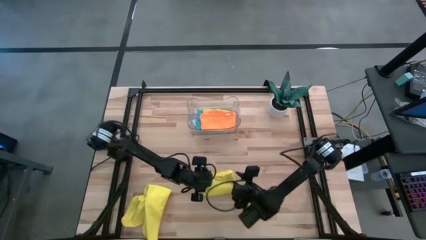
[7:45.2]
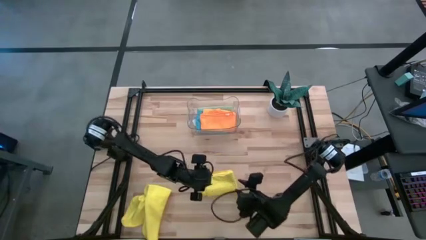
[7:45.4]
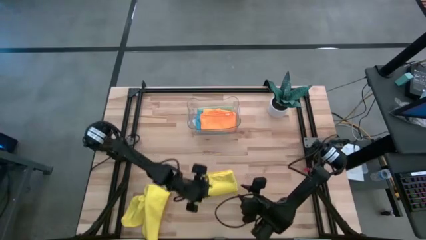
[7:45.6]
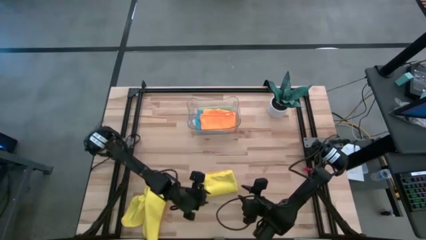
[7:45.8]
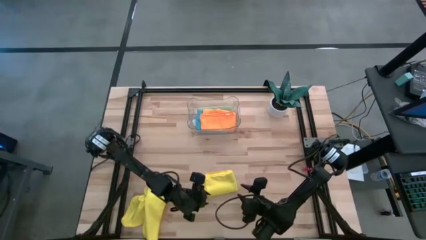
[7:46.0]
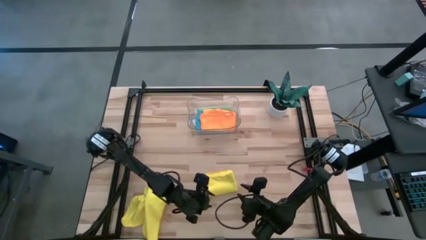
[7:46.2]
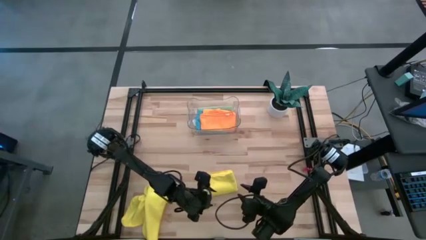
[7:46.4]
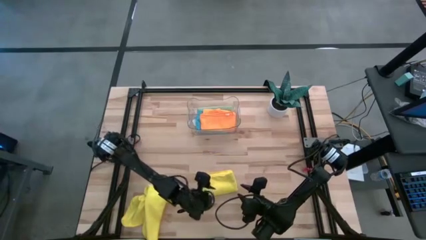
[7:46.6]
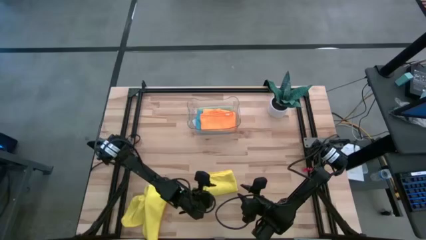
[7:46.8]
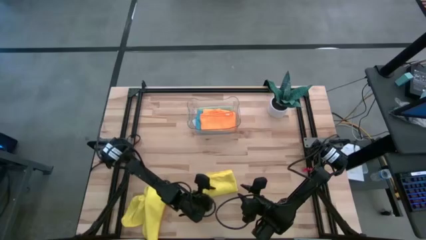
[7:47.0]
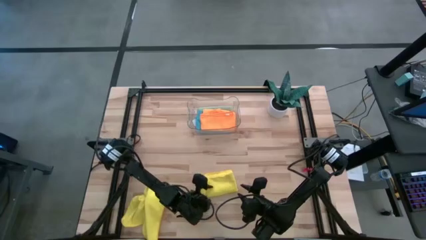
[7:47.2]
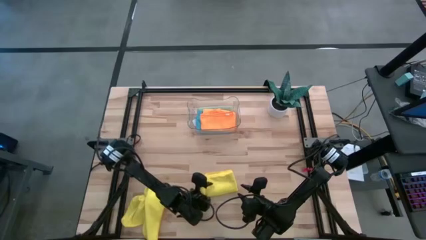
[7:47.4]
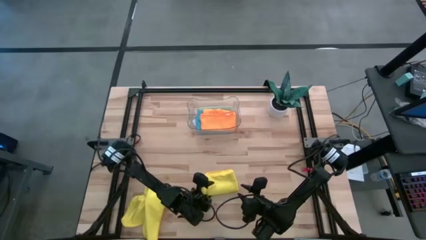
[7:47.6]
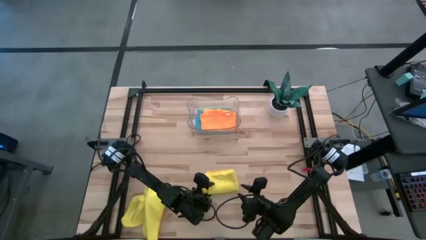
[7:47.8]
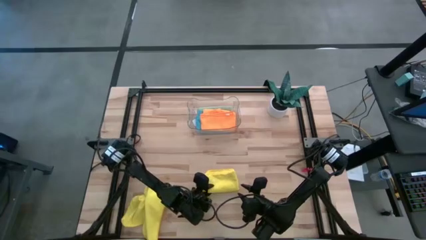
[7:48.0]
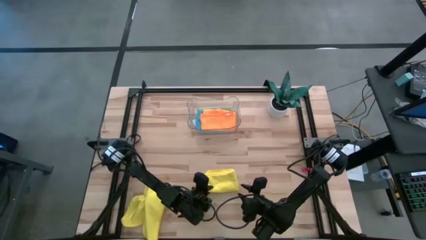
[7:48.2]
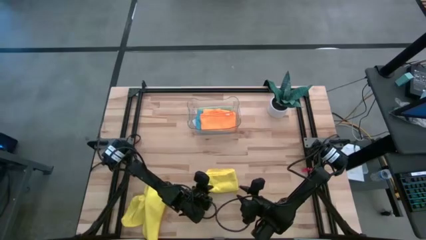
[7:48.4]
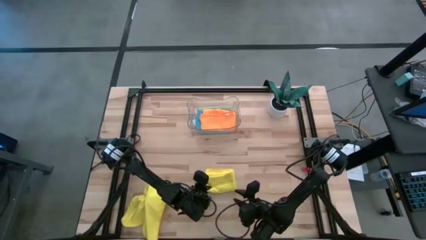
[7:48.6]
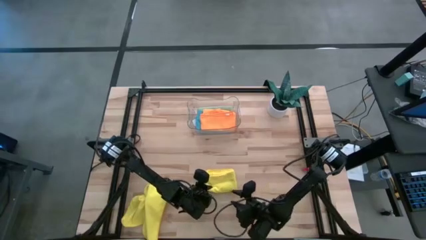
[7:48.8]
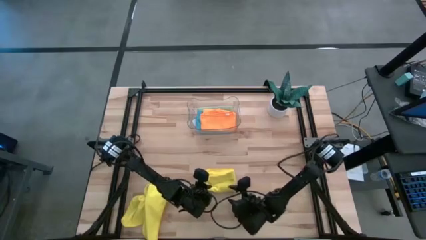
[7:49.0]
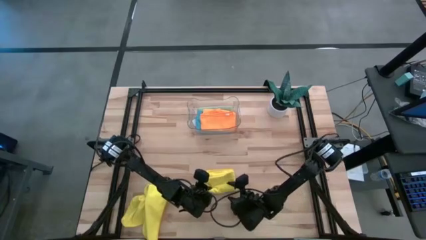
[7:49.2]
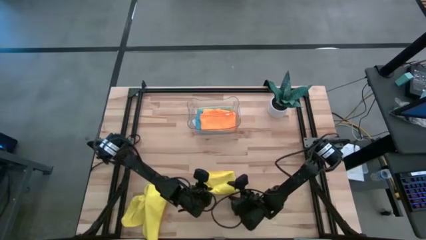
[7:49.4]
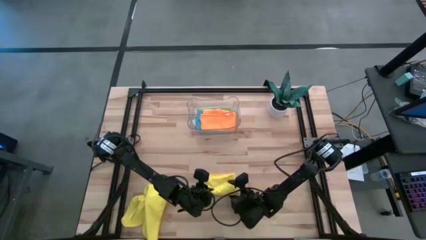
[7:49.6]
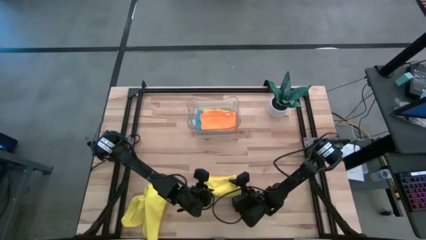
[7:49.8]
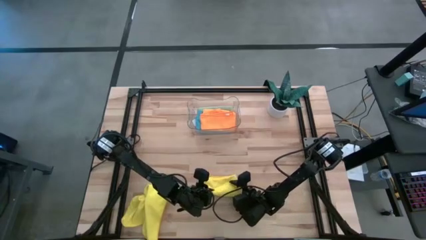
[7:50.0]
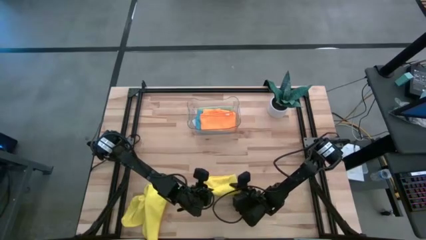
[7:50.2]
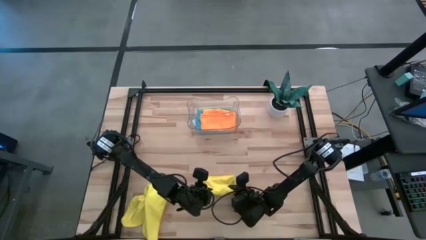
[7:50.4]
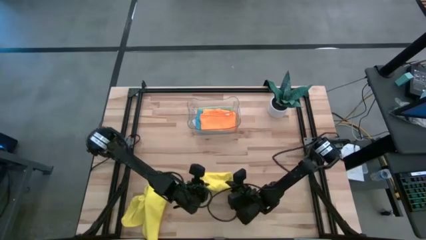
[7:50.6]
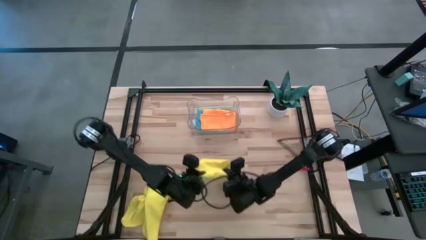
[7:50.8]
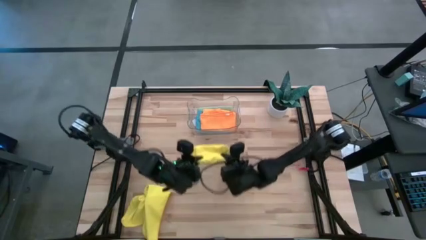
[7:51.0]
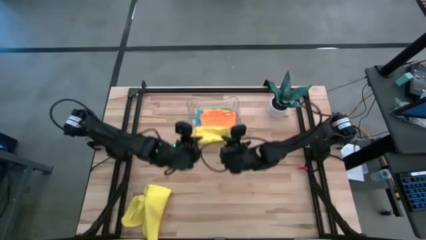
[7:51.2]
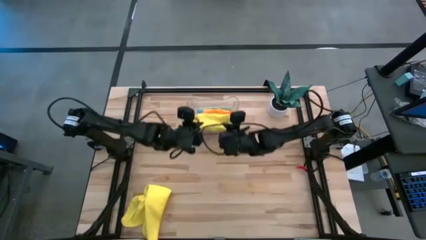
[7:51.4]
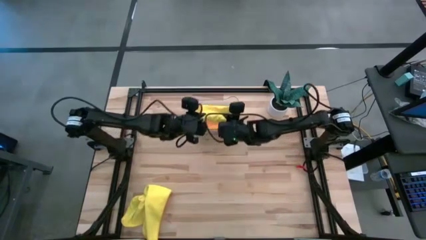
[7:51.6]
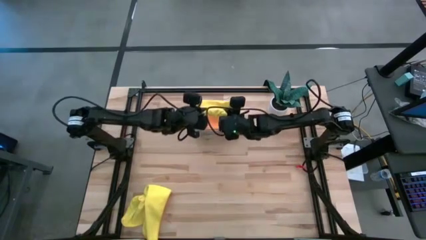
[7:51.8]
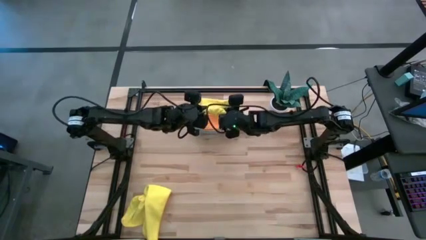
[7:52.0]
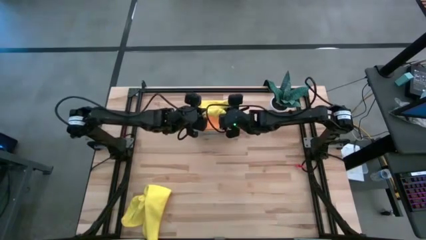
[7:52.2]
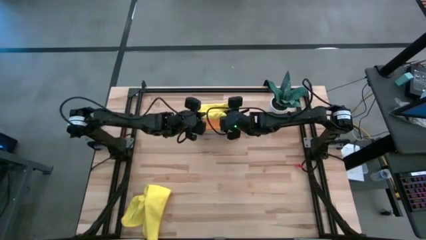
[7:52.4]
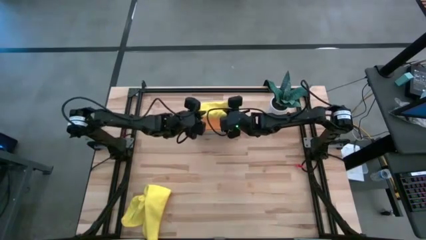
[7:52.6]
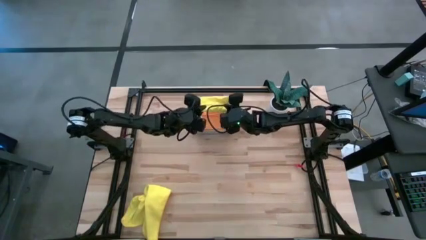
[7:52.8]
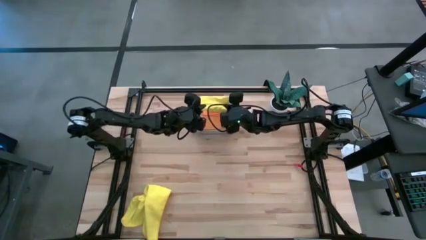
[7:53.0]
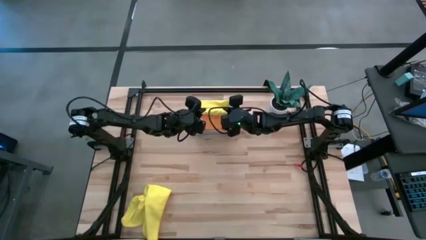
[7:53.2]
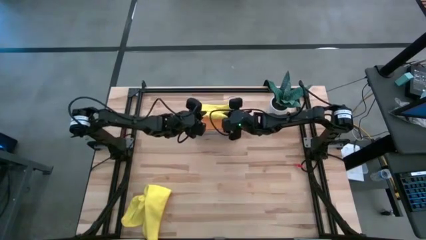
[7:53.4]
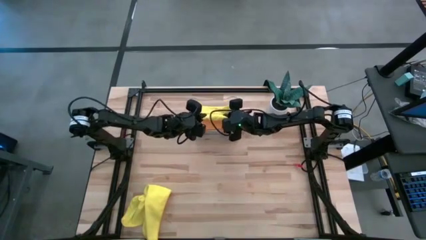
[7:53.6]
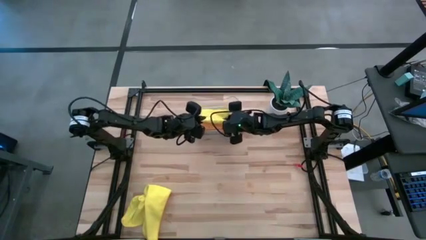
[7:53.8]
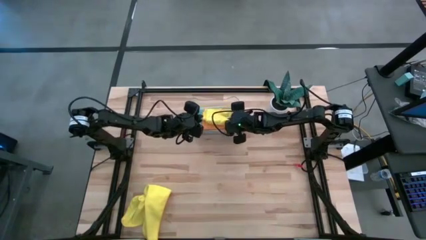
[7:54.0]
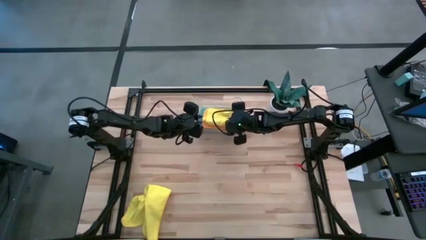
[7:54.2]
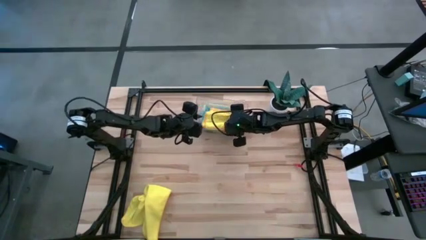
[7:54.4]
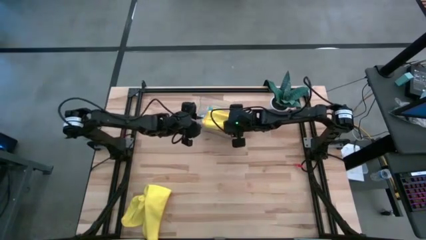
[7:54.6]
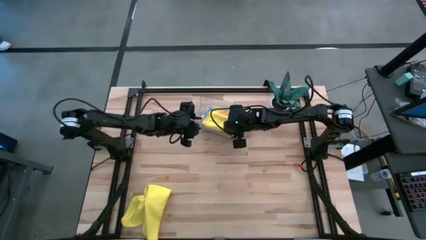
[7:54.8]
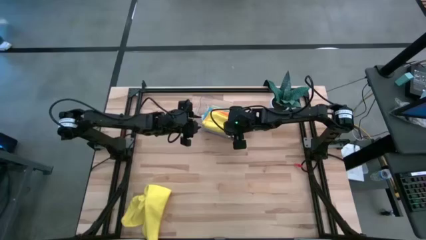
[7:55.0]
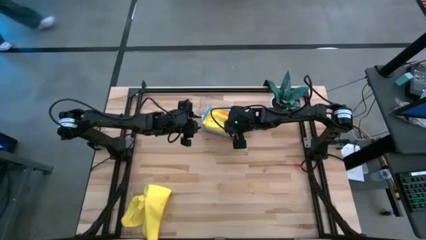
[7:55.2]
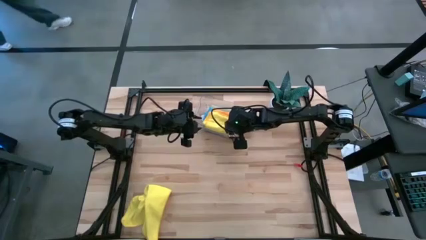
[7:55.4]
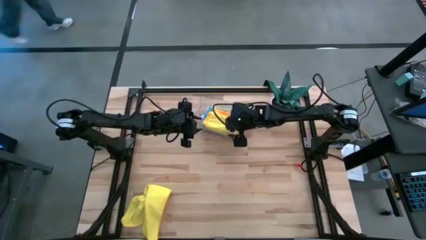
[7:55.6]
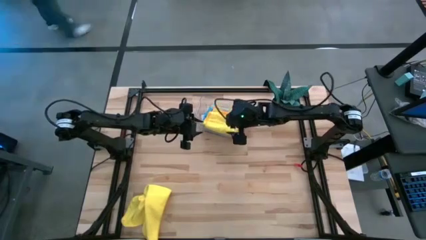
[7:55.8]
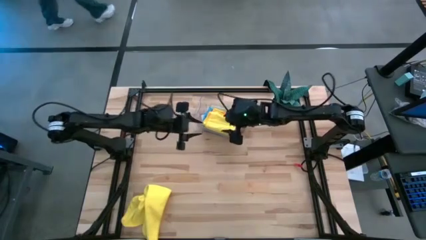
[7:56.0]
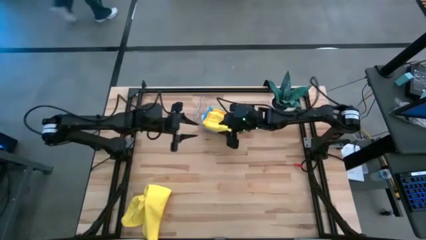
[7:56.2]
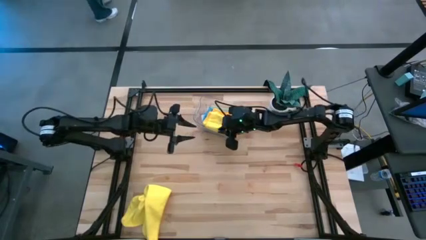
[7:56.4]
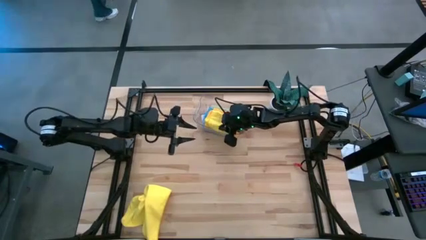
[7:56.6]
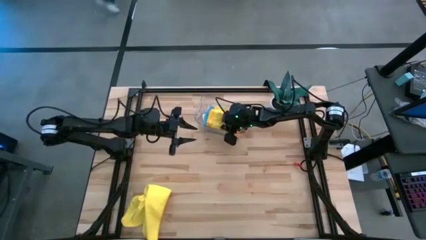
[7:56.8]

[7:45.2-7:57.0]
Task: Fold microfiber towels
Put the yellow folded towel into the transparent bin

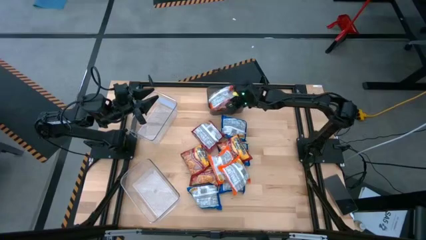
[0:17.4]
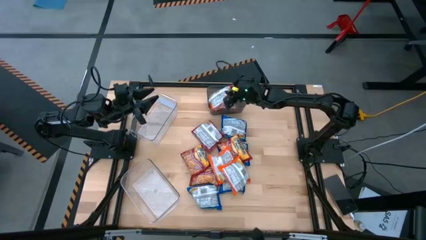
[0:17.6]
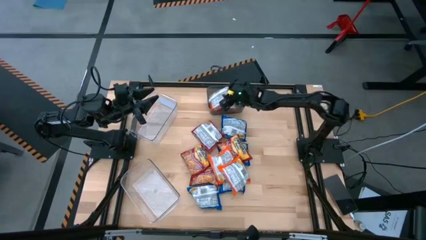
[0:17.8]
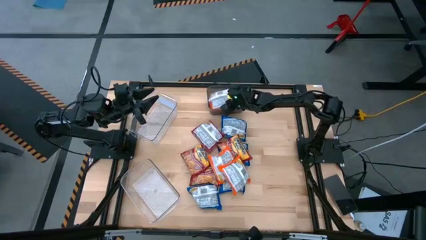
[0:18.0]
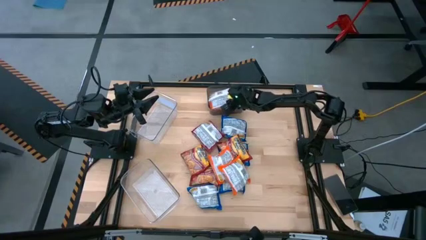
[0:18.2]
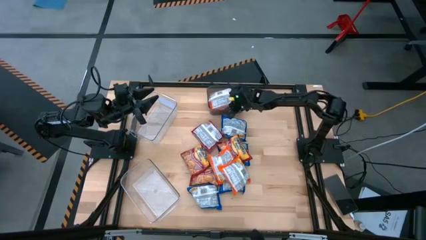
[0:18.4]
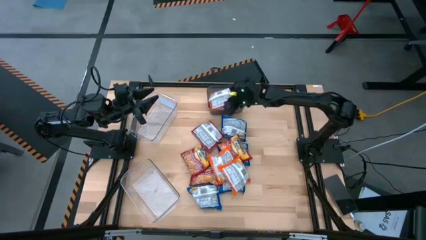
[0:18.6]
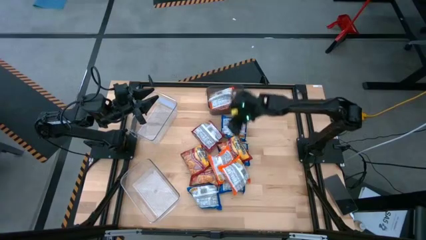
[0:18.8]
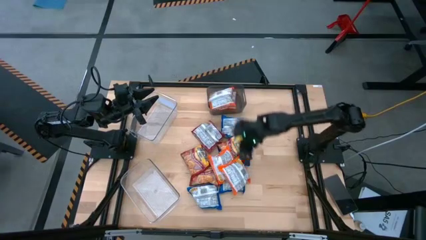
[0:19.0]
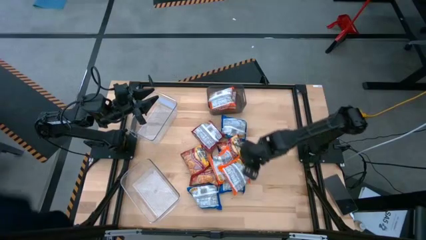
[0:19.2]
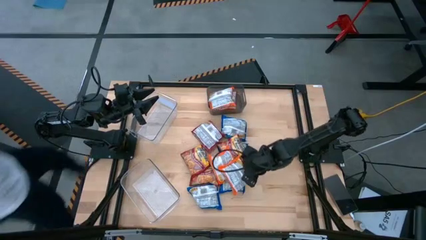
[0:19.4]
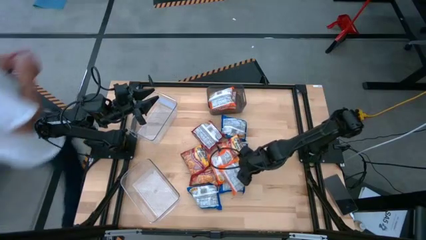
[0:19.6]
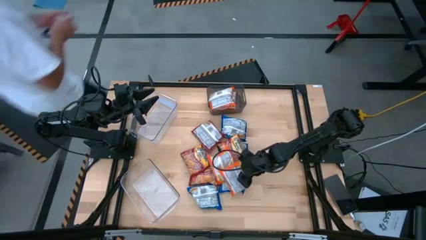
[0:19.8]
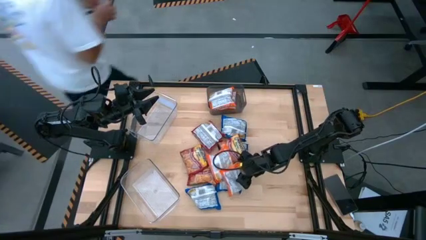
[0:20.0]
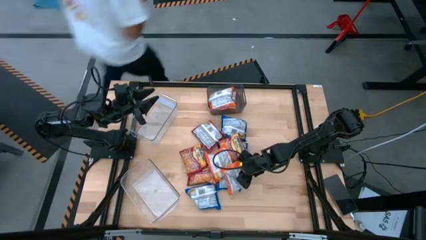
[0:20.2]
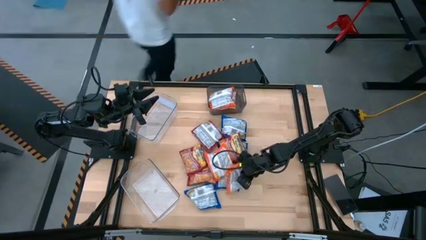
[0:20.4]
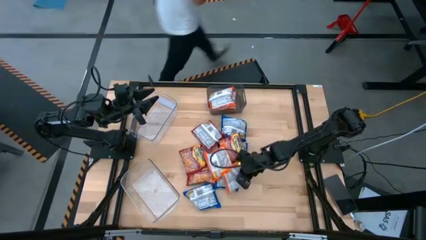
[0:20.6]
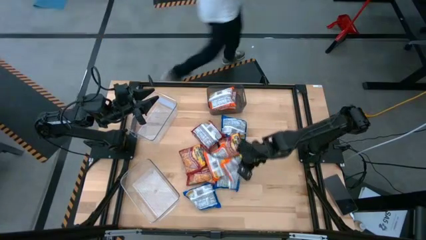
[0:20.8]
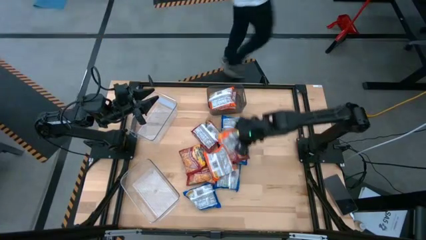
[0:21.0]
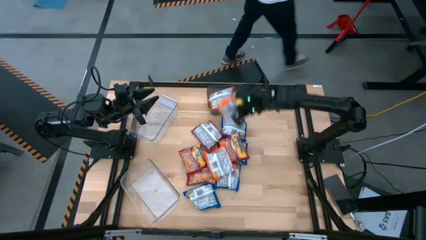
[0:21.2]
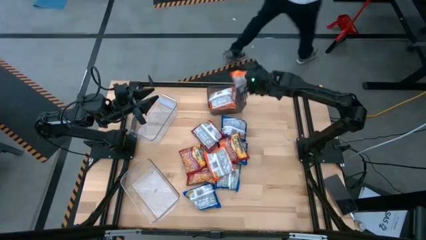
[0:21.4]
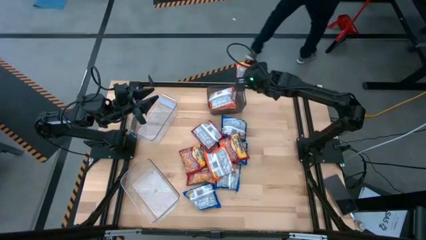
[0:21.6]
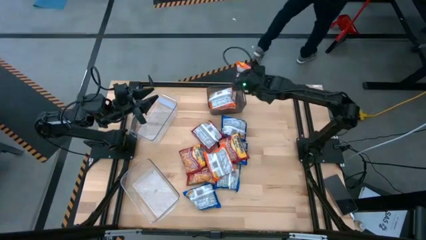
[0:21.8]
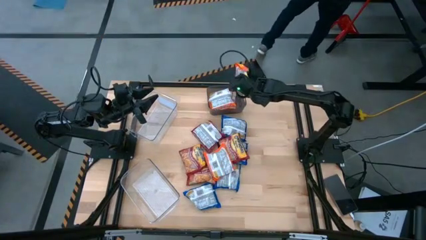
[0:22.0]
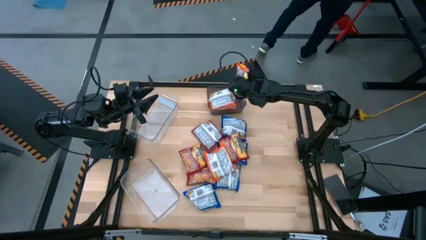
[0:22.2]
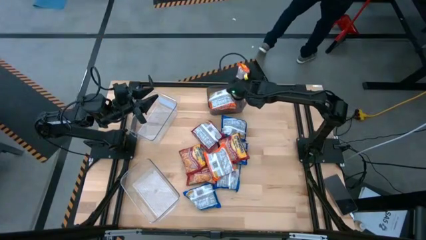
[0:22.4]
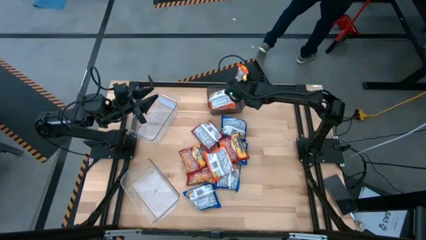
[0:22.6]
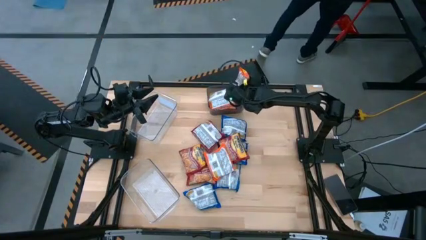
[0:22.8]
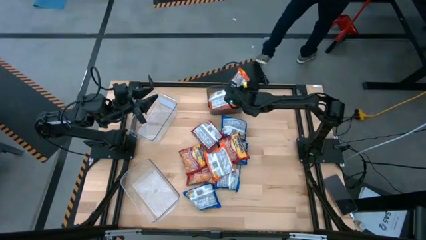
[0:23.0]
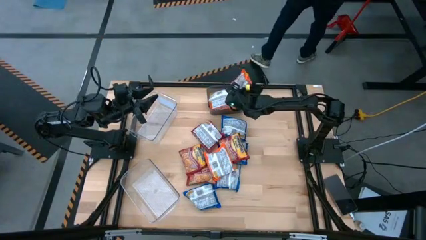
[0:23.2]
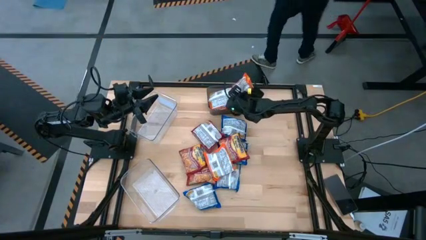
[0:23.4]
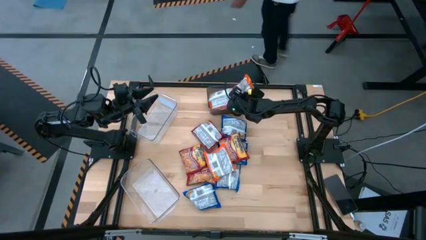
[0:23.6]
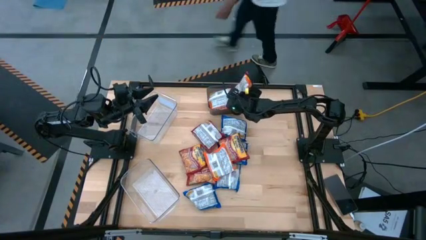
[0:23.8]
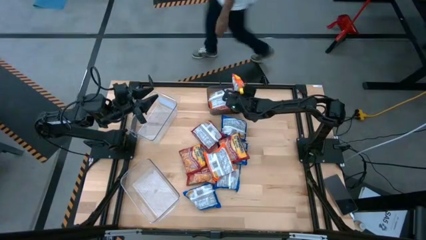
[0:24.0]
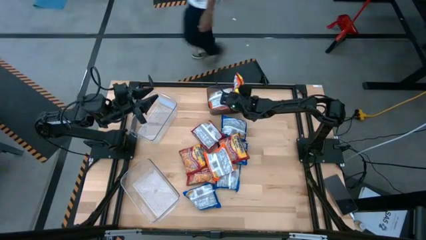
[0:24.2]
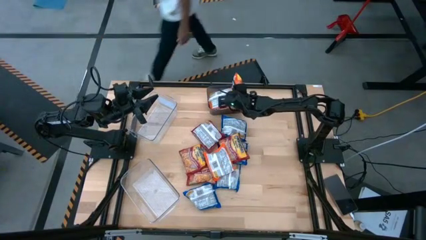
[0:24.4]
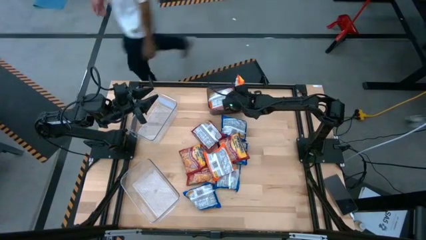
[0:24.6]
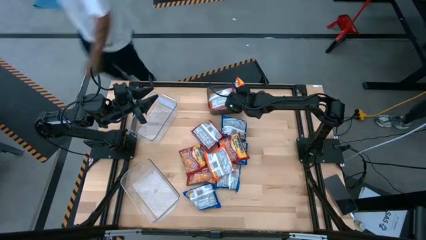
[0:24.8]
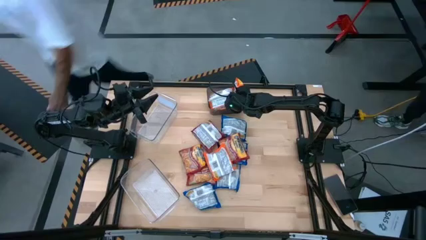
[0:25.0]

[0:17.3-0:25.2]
Task: Sort Maruchan noodles
Put the orange noodle pack into the black bin
